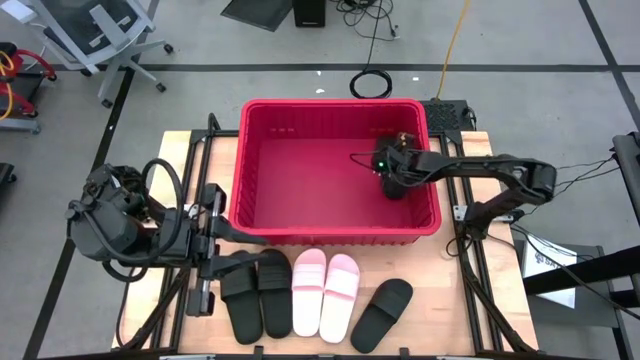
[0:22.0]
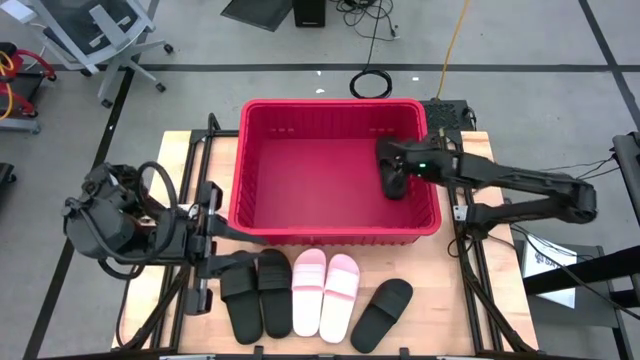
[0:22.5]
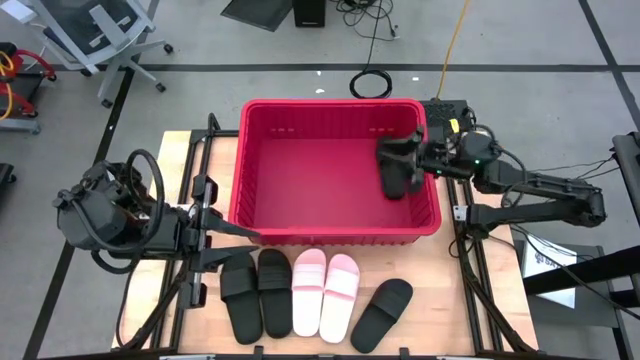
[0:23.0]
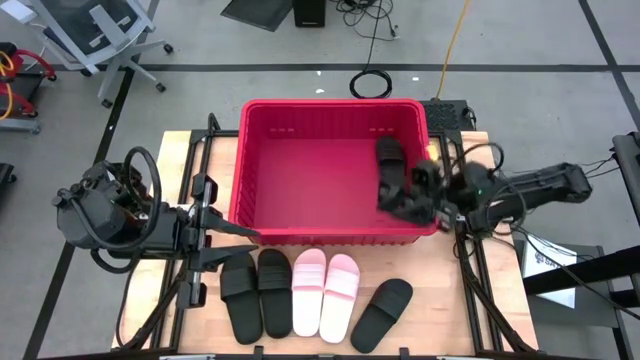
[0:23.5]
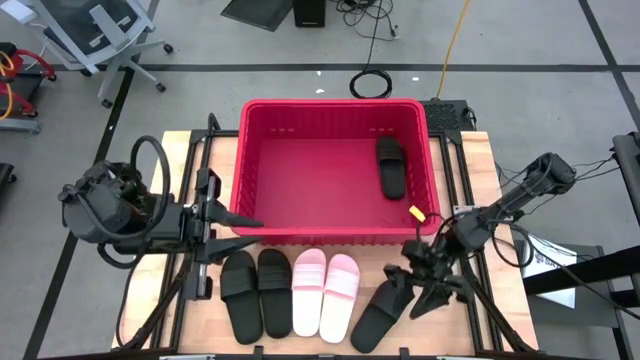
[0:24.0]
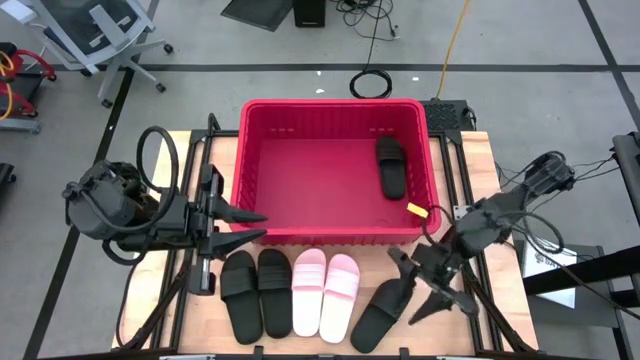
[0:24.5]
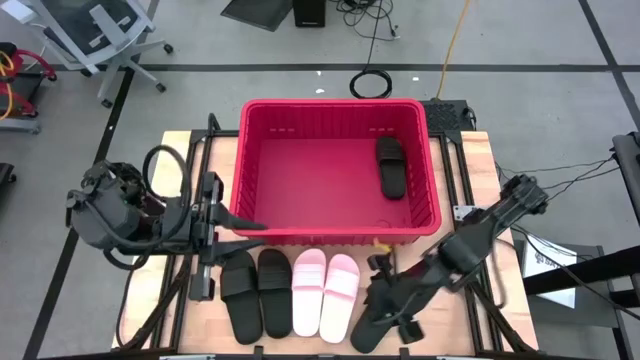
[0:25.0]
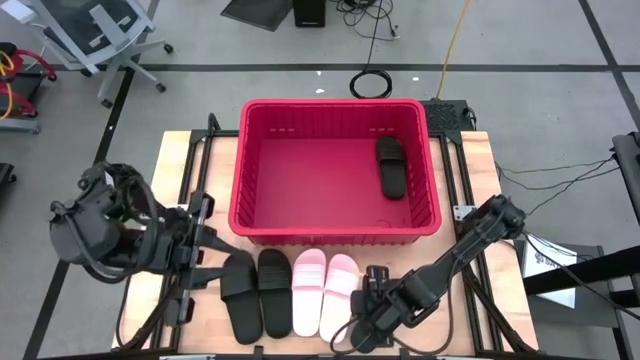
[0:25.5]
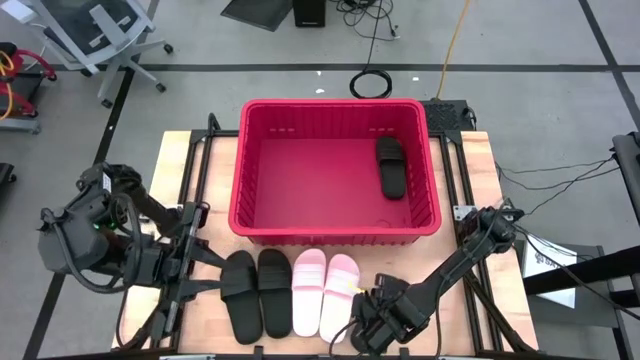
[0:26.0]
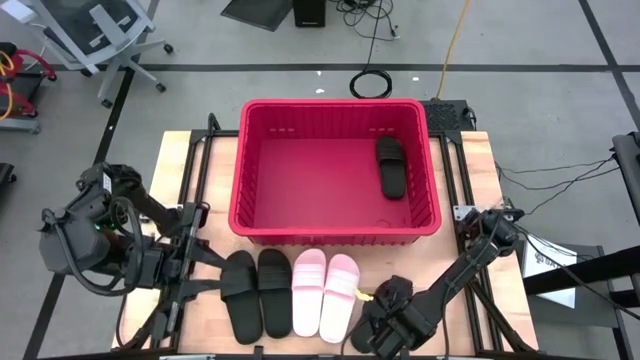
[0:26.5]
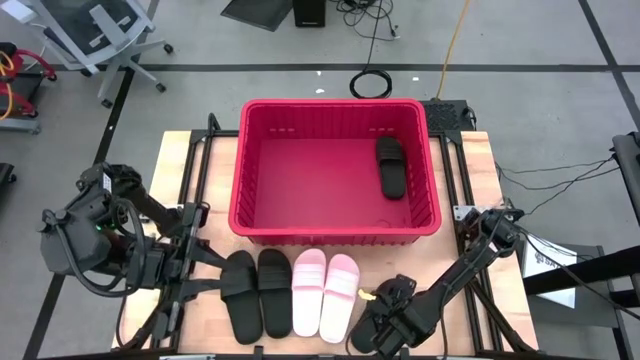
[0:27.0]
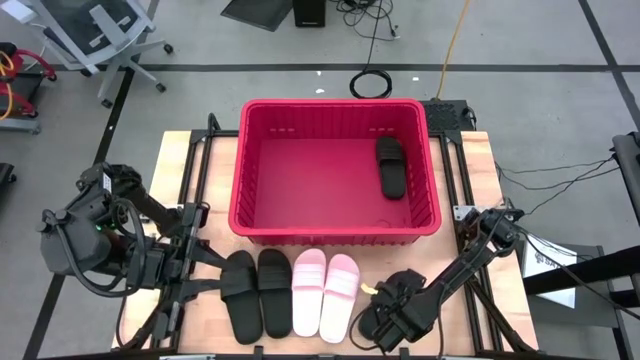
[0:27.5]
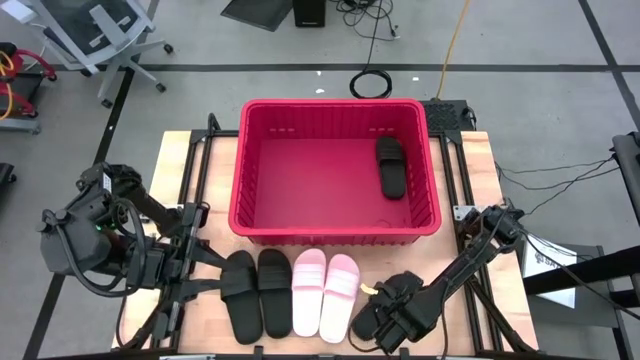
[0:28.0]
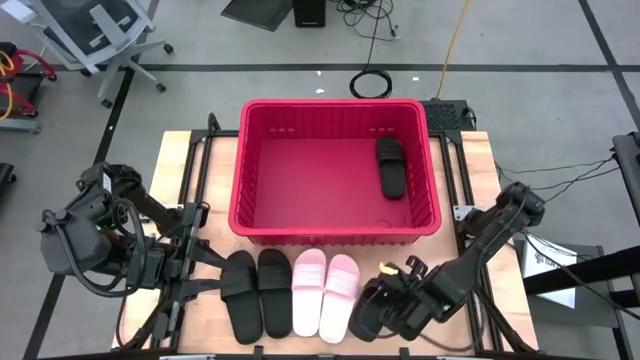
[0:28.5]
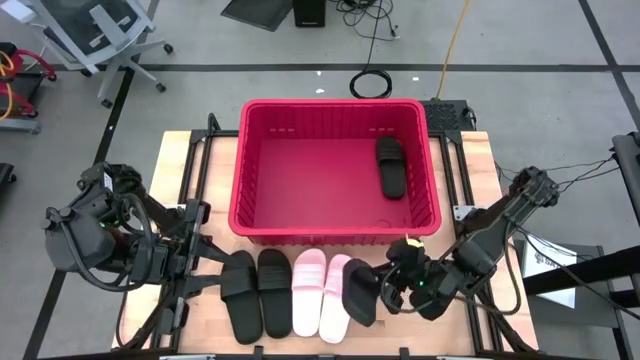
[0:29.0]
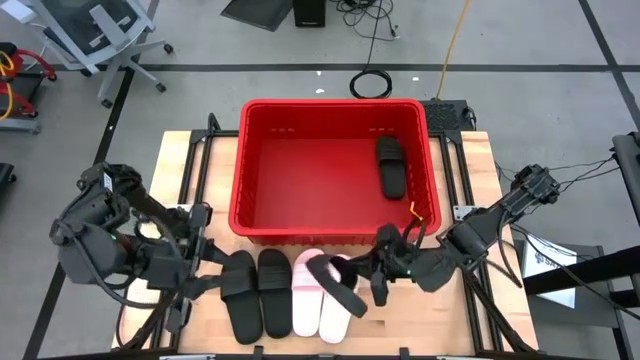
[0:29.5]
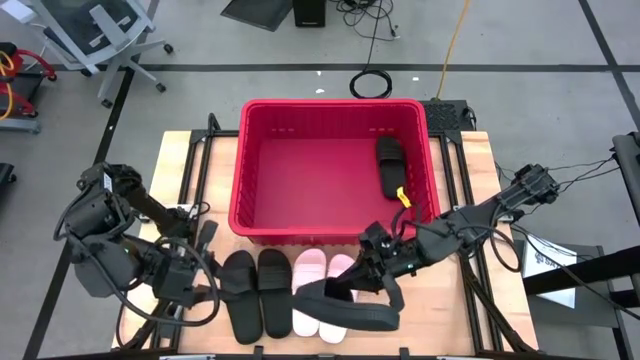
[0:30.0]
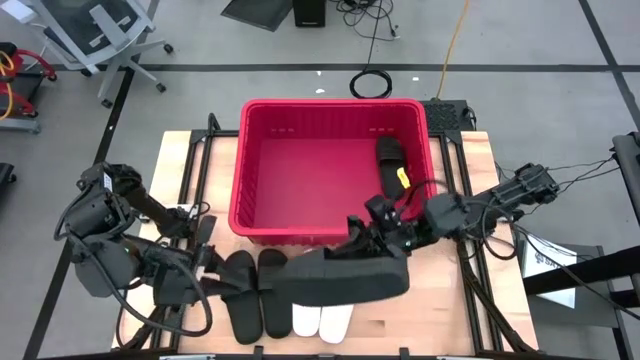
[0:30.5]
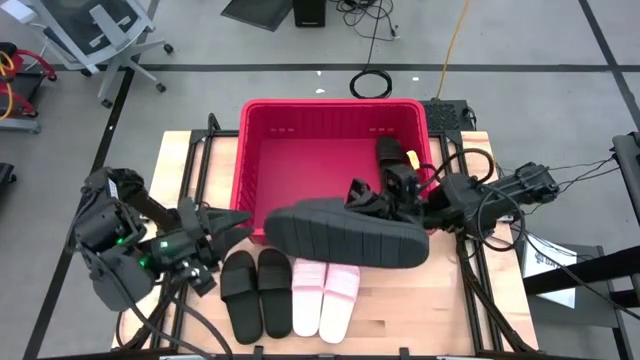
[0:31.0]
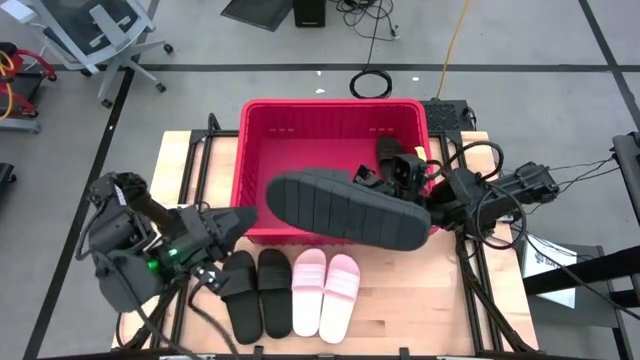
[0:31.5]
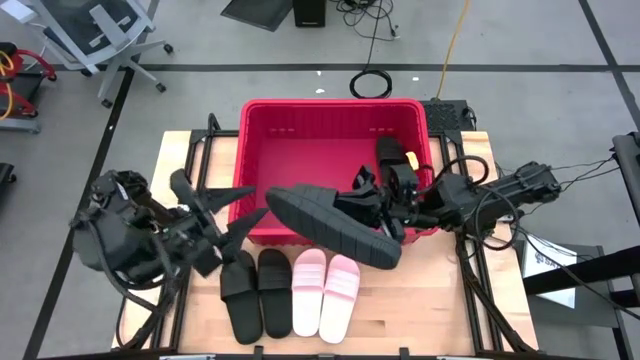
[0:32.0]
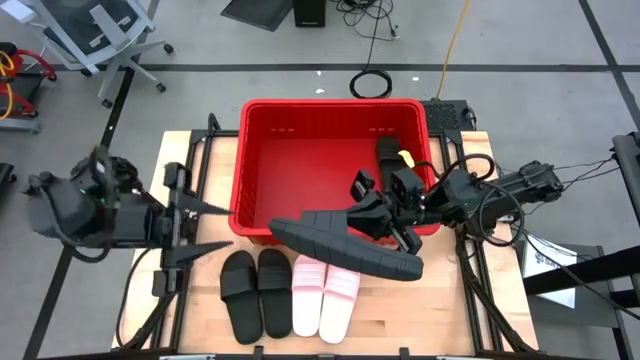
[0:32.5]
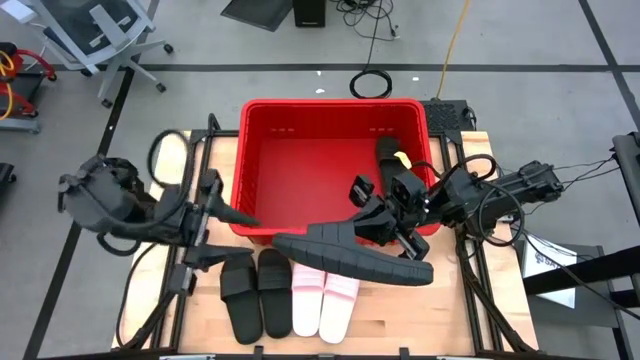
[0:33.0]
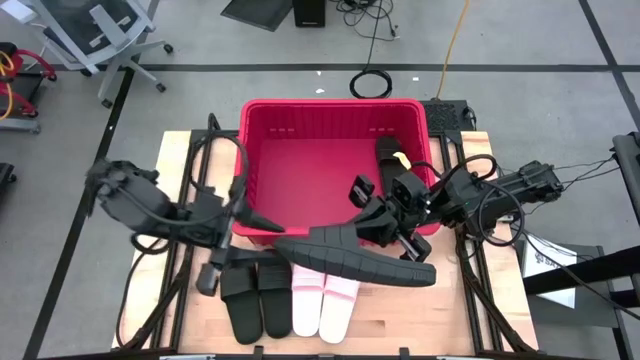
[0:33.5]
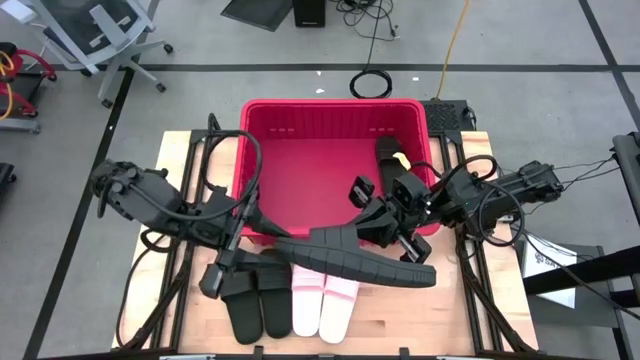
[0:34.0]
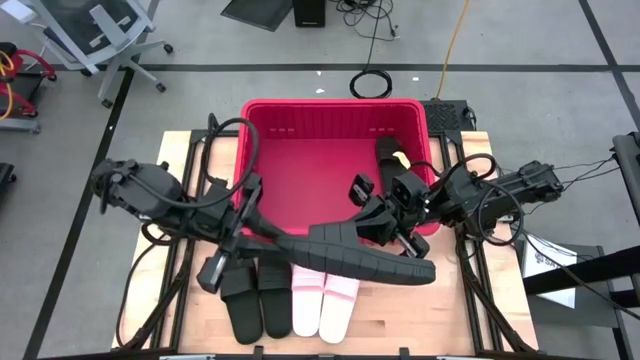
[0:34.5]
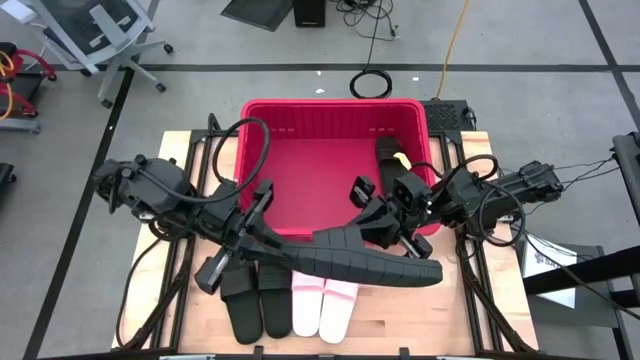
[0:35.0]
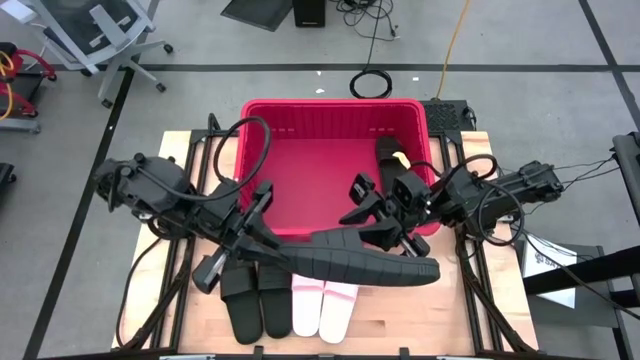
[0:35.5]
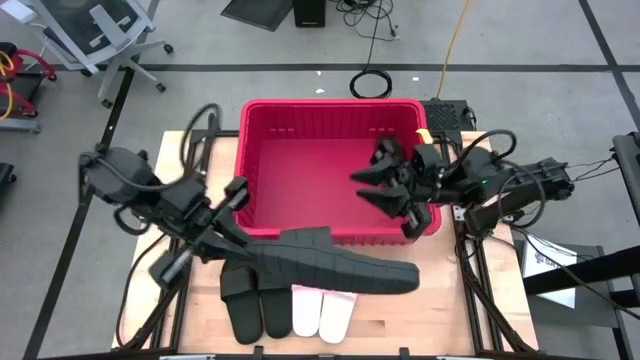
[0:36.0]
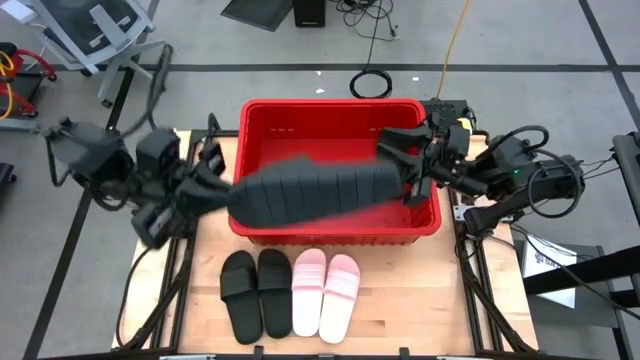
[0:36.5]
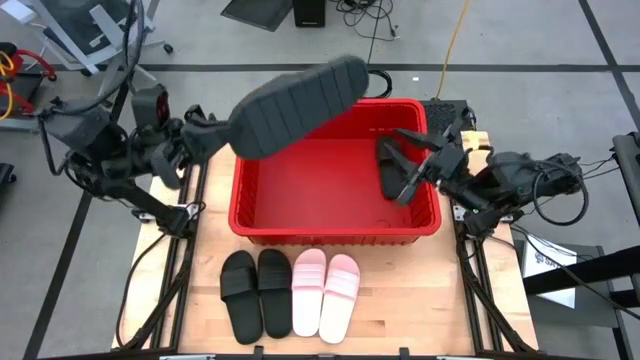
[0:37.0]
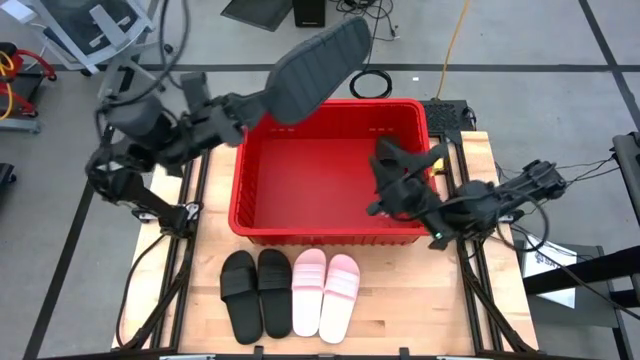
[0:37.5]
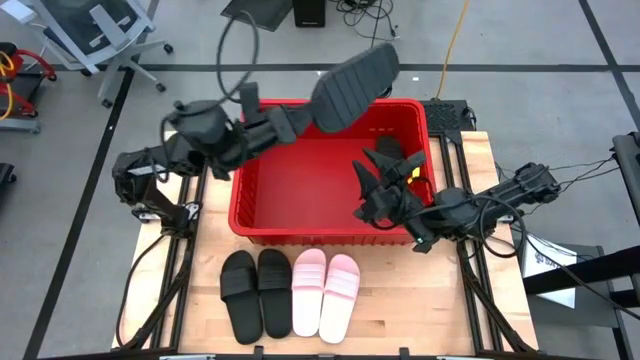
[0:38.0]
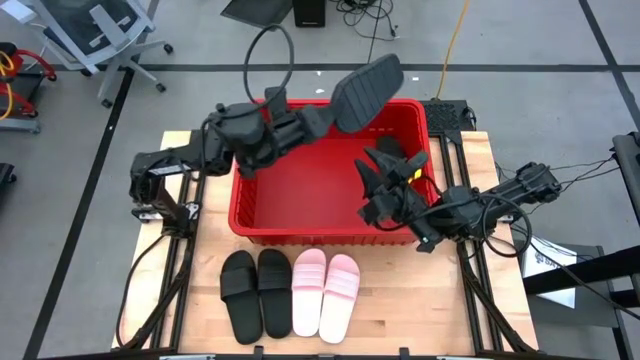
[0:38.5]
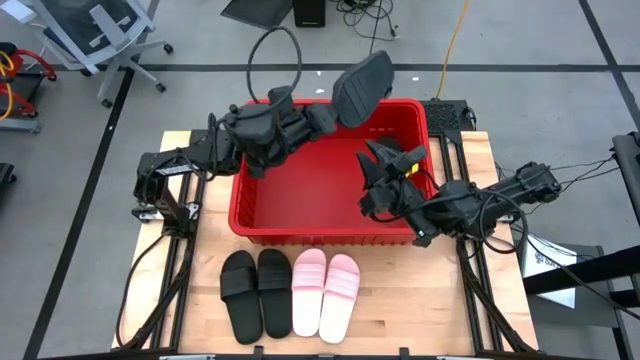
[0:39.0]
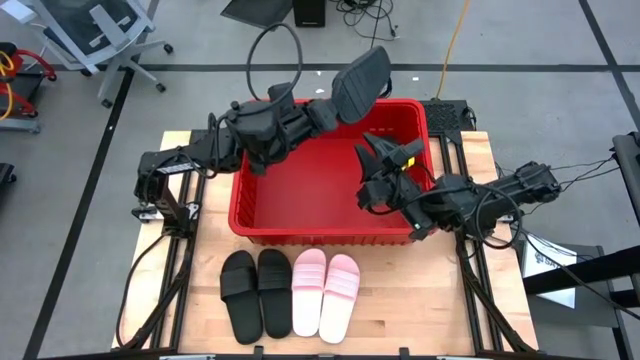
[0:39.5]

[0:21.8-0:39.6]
Task: Pick and place slides into bin
Put the black slide into the red container

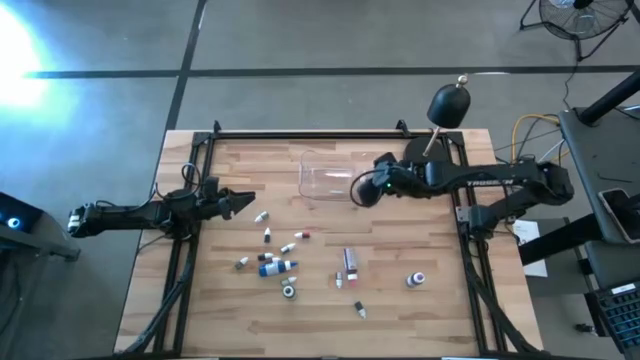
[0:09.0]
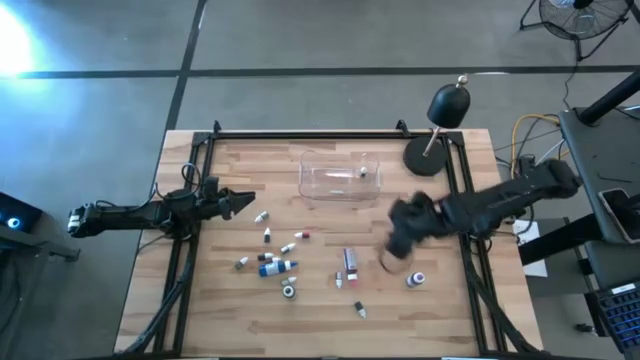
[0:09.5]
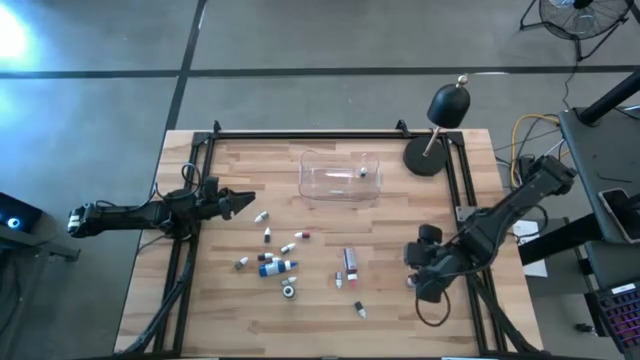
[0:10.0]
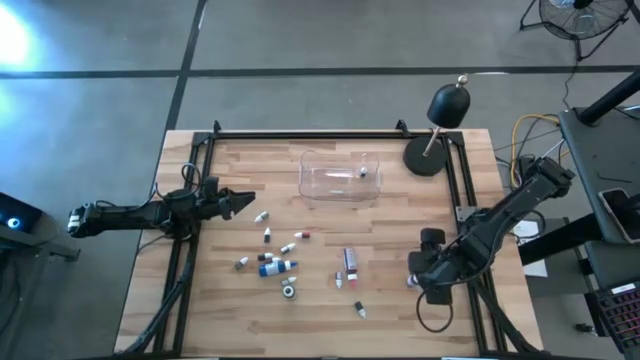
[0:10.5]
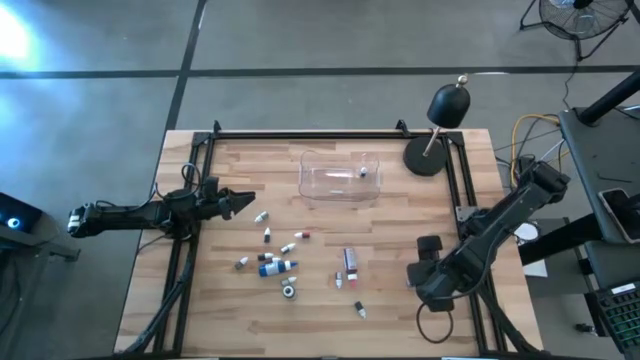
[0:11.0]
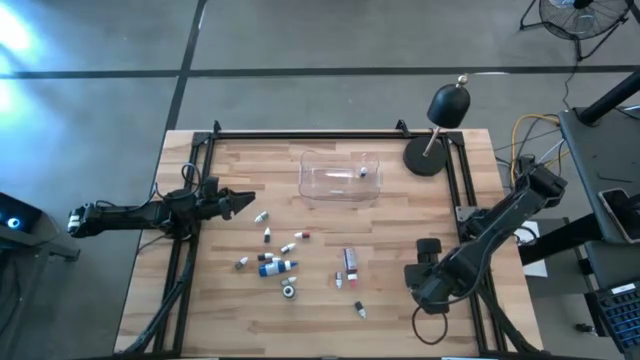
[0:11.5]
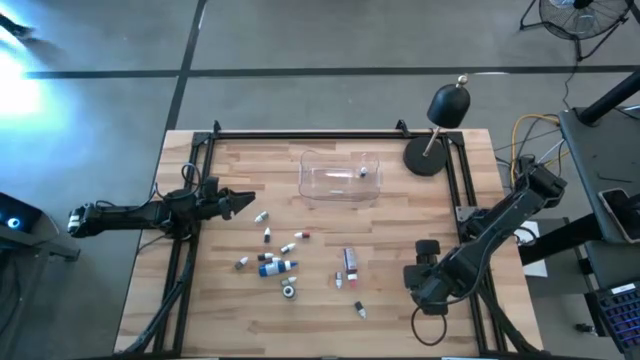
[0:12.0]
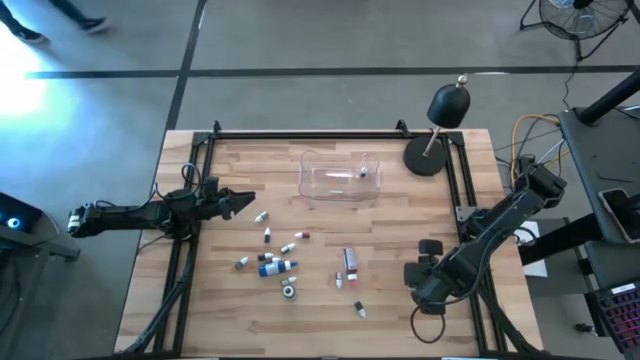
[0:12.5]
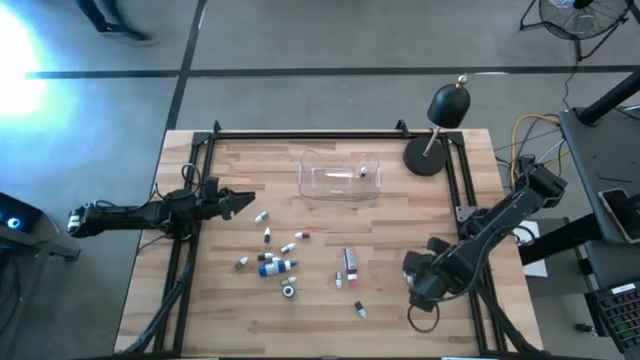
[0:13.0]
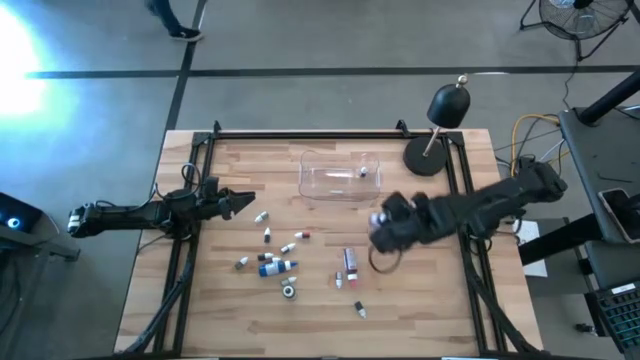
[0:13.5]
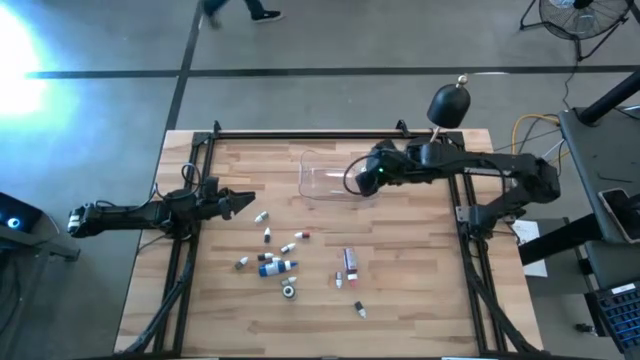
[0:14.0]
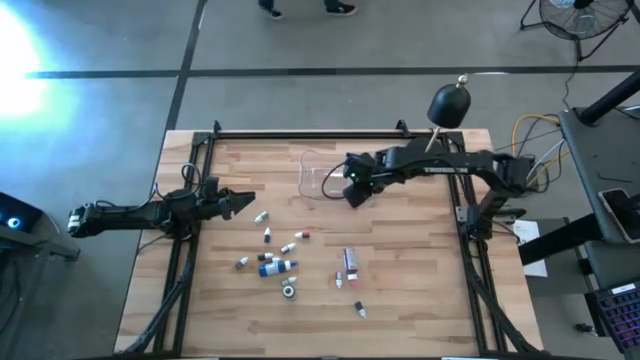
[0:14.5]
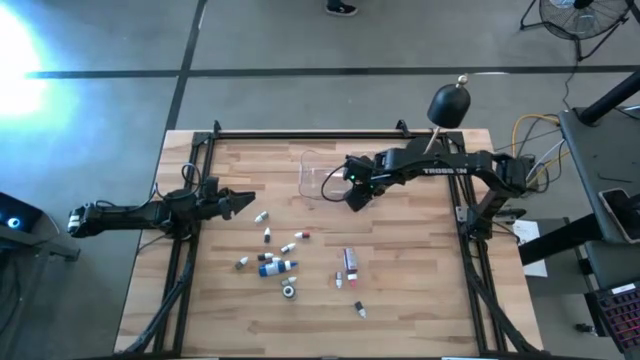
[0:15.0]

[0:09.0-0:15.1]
Task: Pick & Place food coloring
Put the big purple food coloring bottle into the transparent bin
